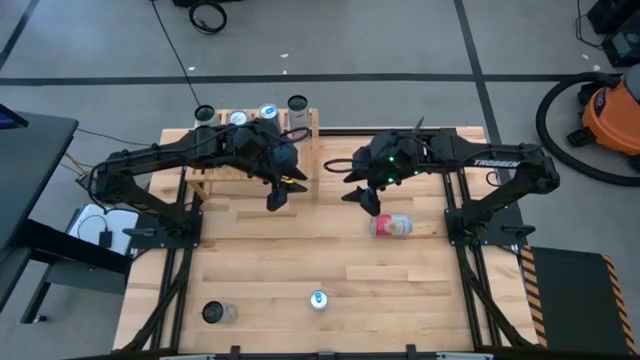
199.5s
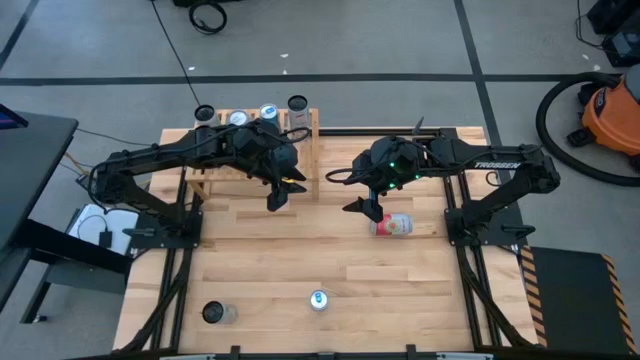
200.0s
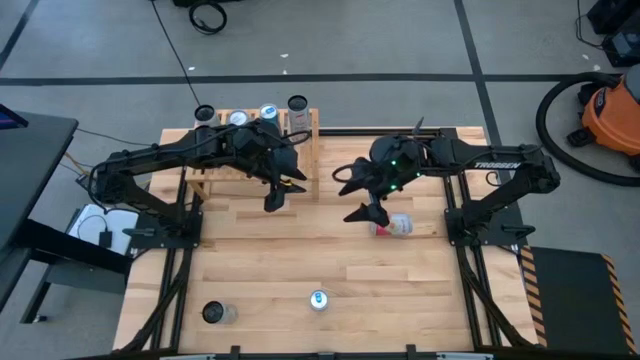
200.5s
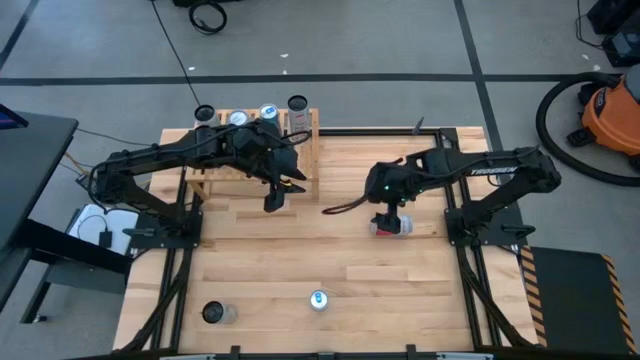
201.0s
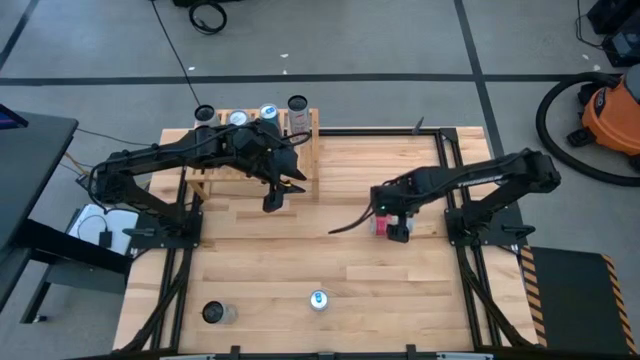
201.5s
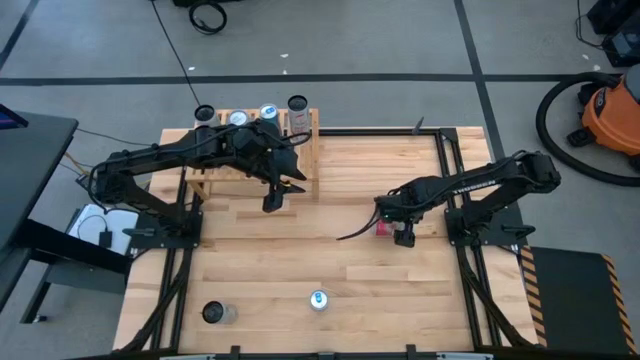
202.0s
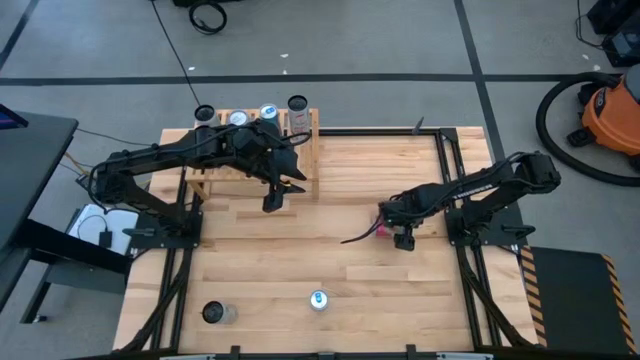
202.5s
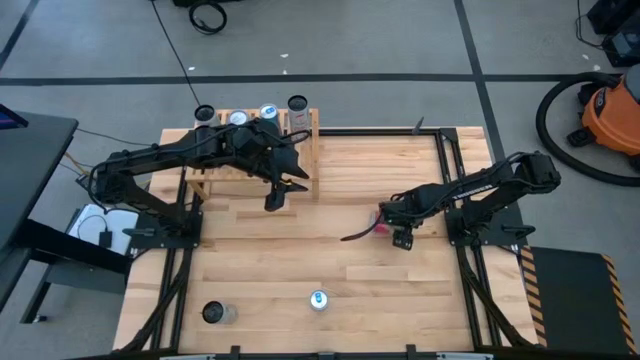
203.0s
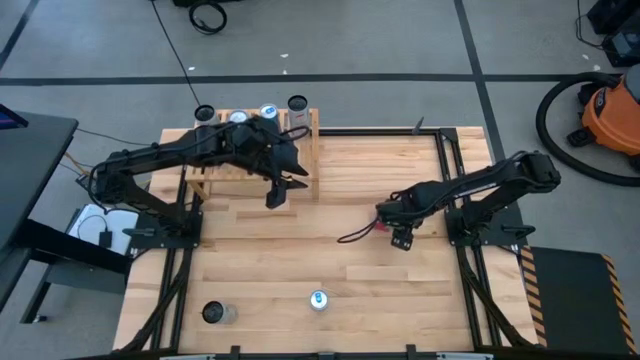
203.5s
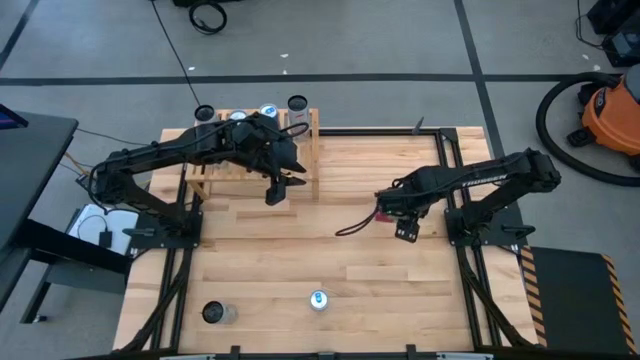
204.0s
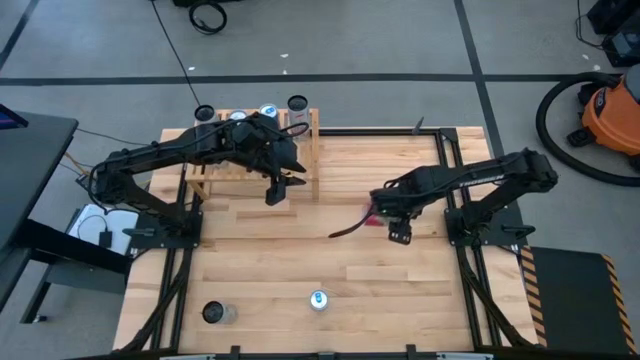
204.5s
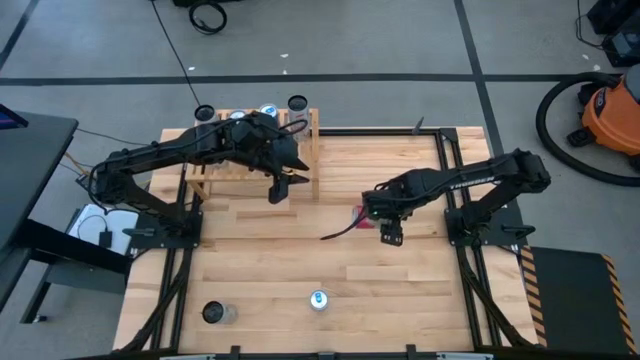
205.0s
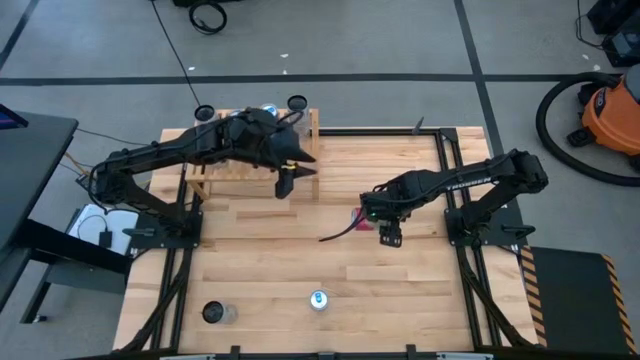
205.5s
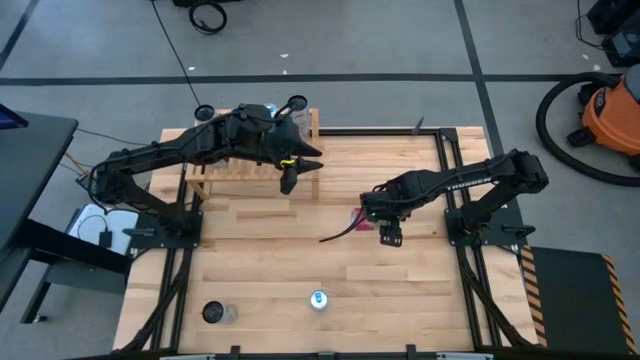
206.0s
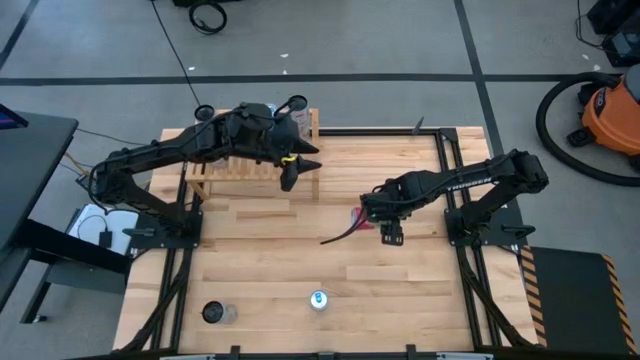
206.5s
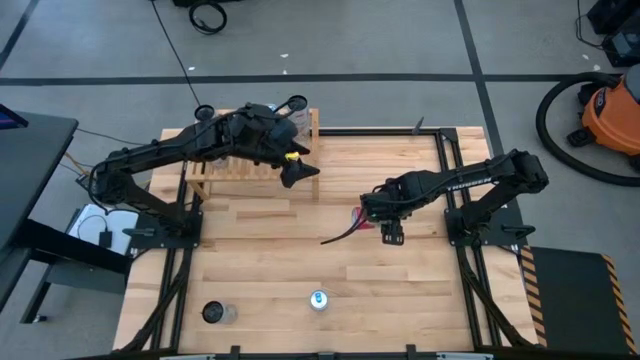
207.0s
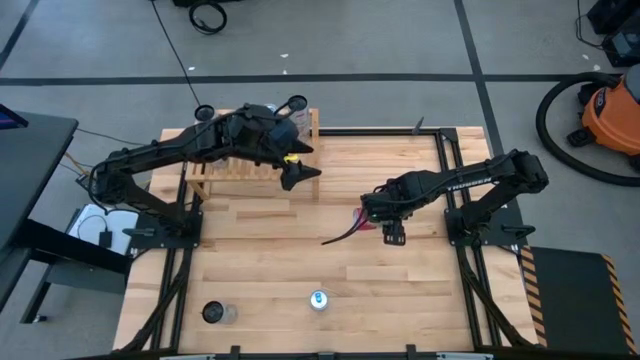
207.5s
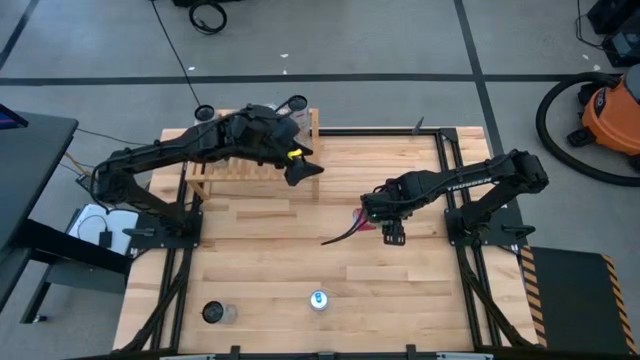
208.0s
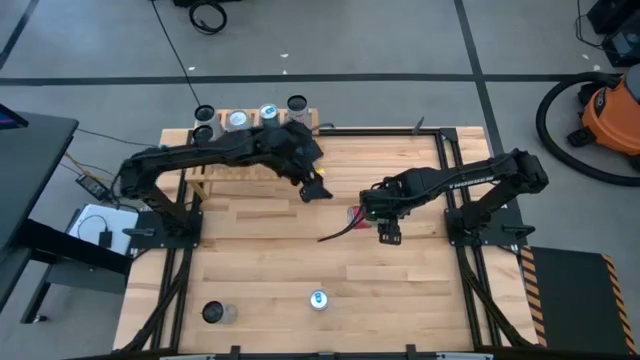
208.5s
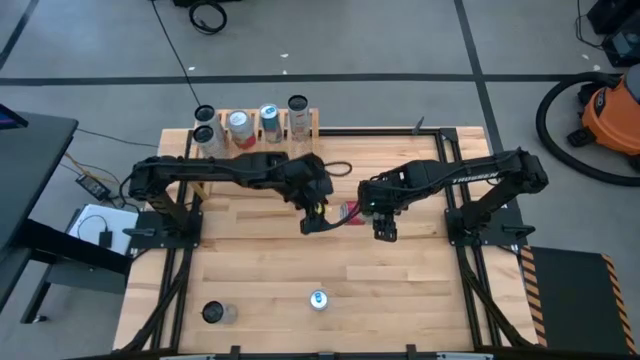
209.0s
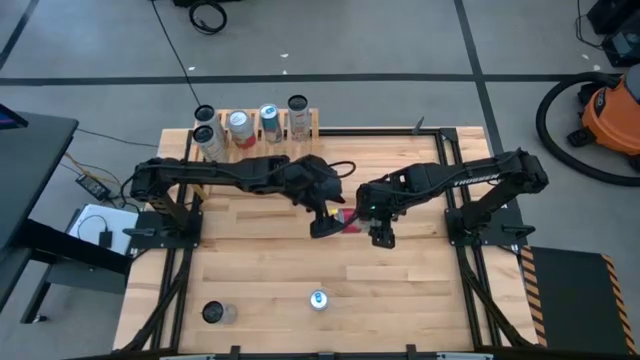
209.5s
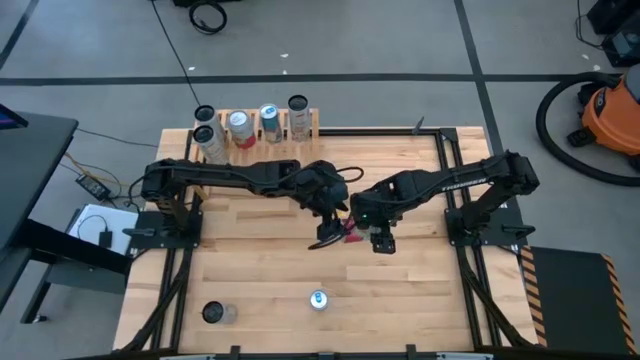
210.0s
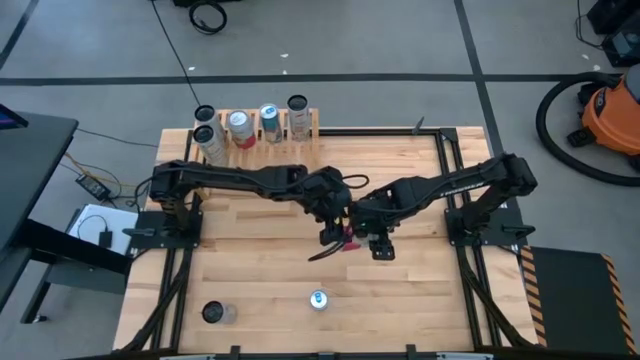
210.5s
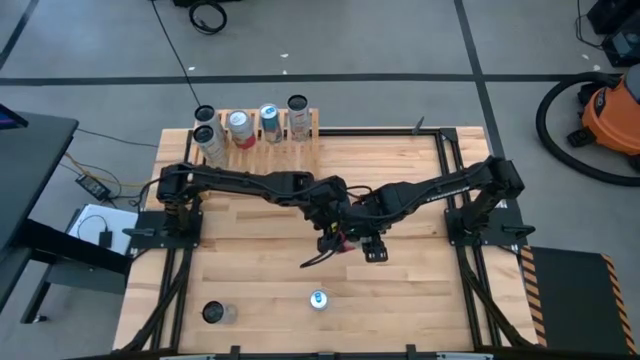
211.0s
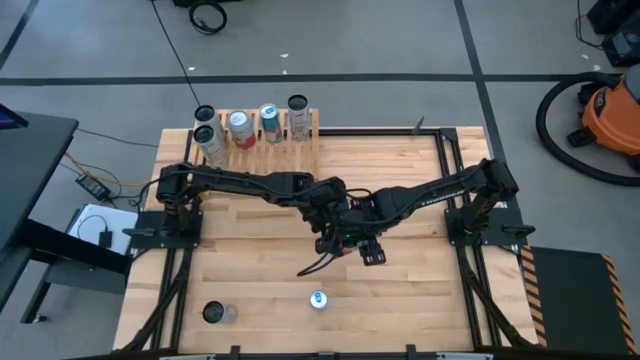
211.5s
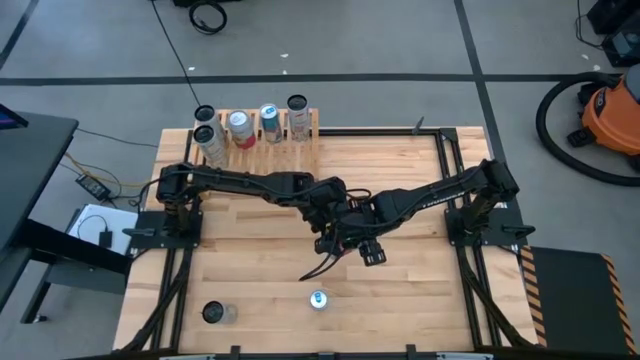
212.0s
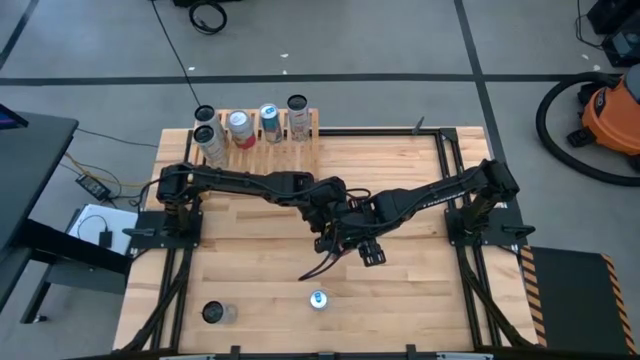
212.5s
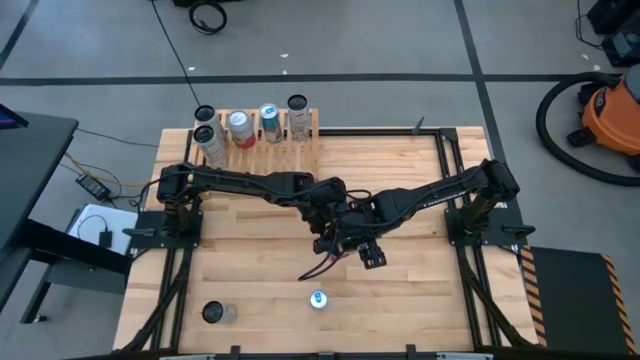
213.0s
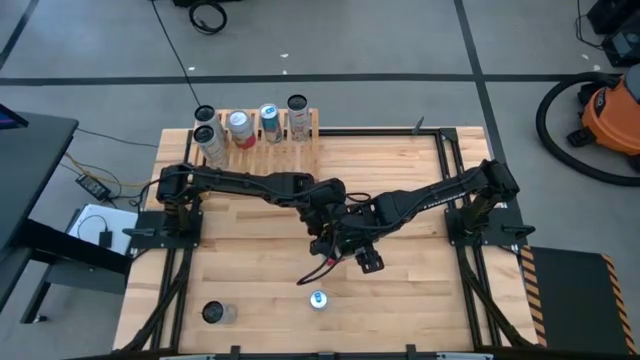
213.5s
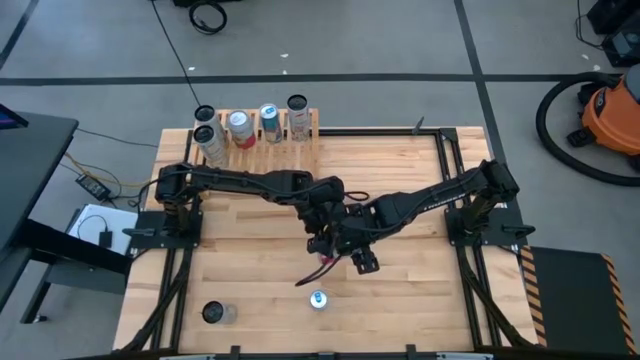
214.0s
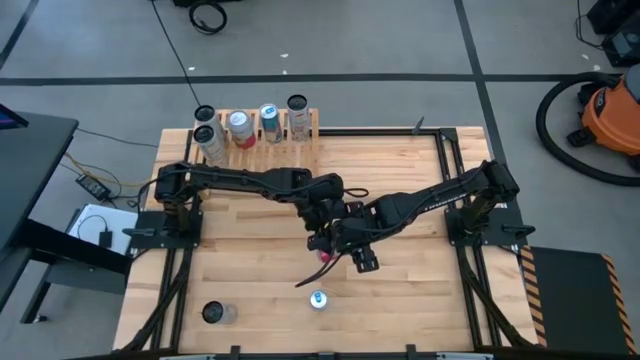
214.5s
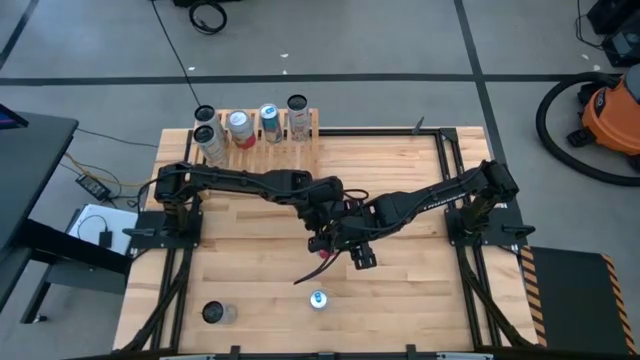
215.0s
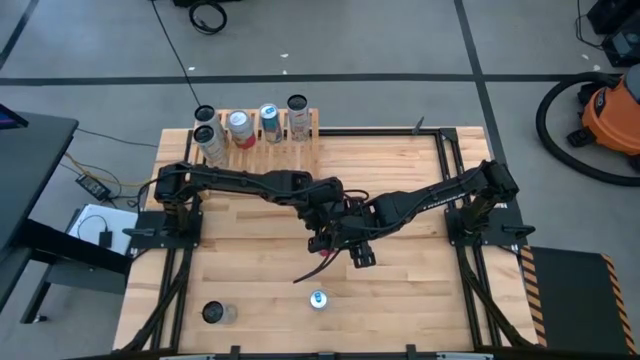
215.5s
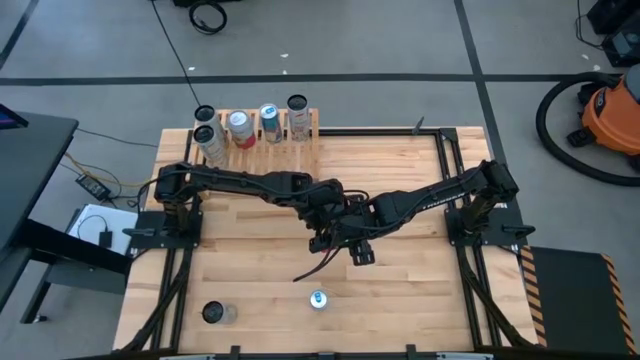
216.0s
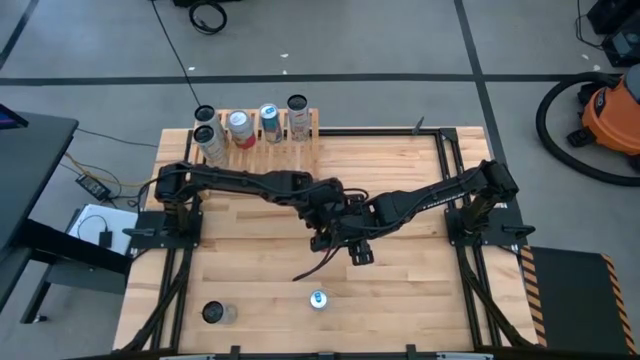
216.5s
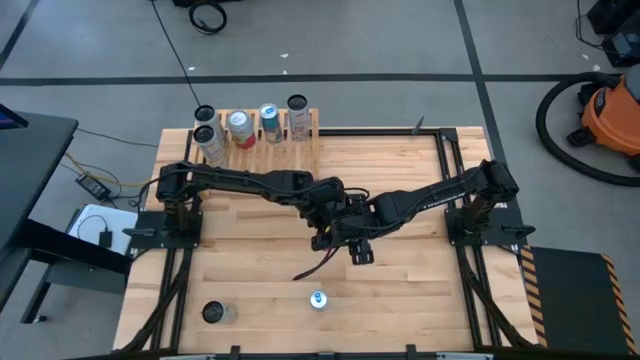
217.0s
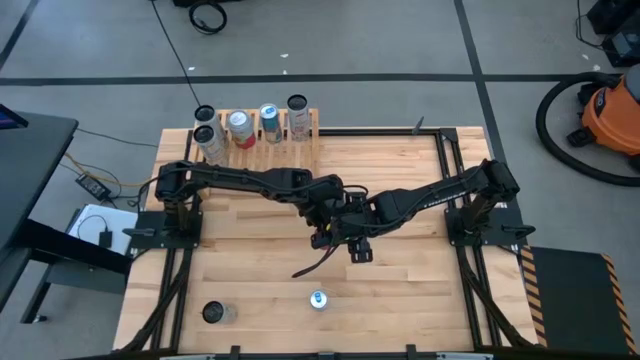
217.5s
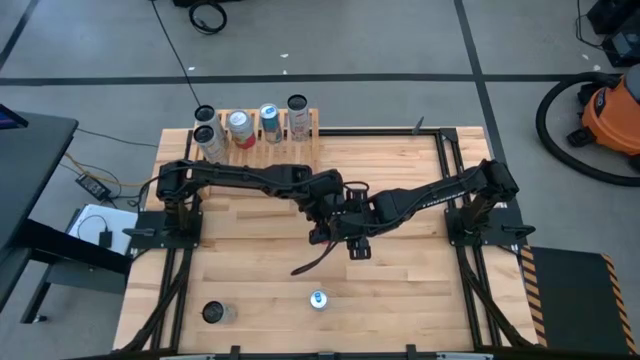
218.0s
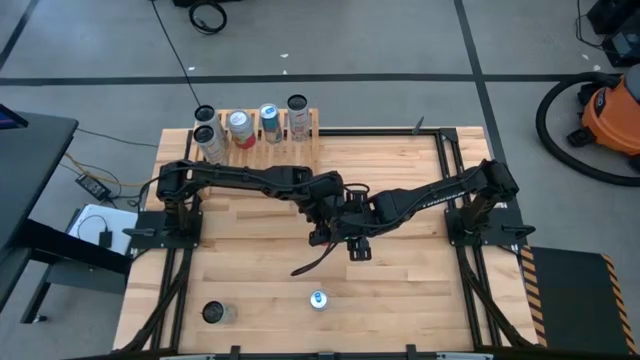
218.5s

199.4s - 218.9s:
Task: Place canned beverage on shelf
Put the pink white soda can on the shelf aligned with the other pink white soda can

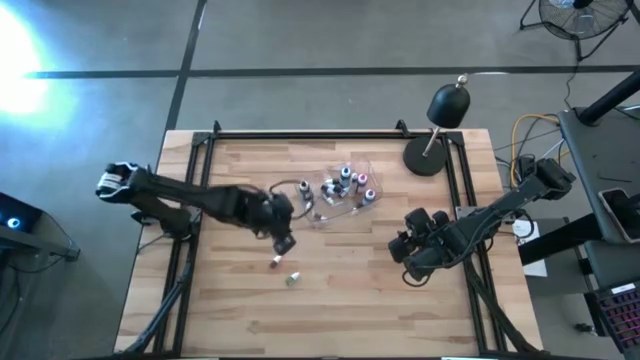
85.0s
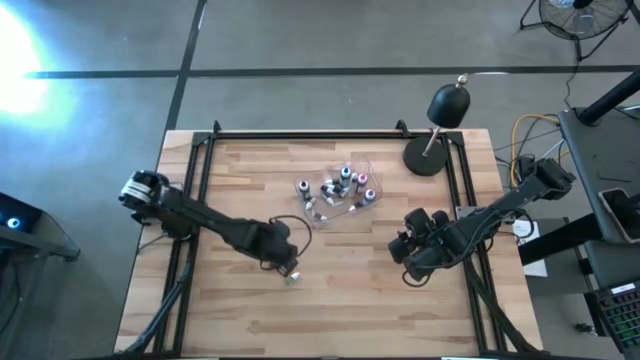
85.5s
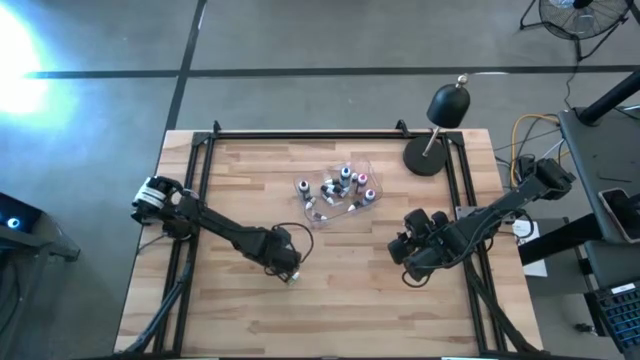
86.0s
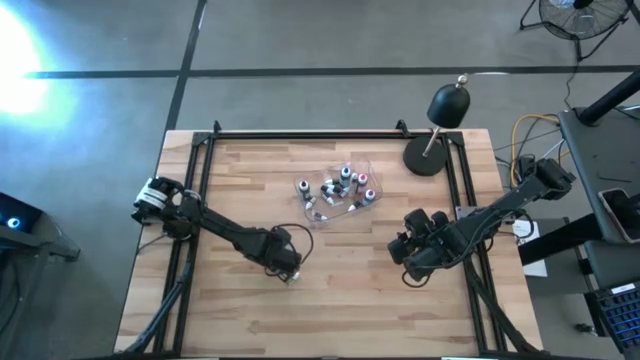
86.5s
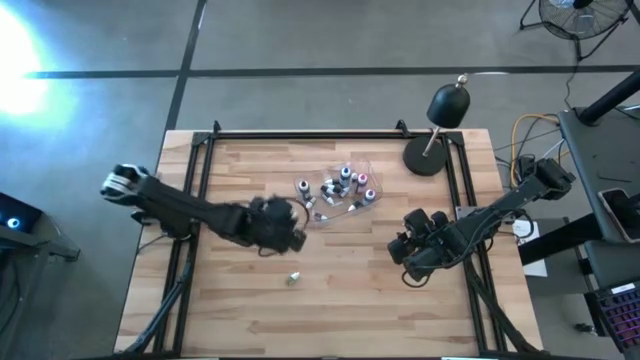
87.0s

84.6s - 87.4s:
Task: Pick & Place food coloring
Put the small red food coloring bottle into the transparent bin

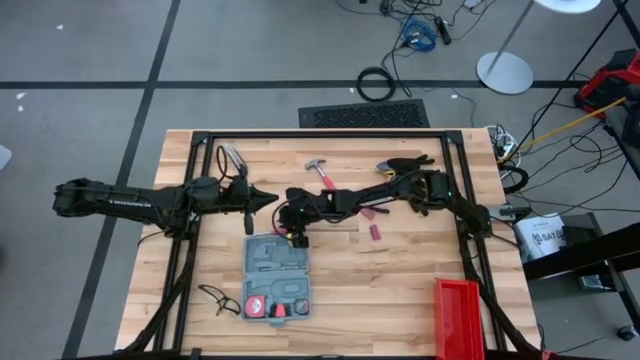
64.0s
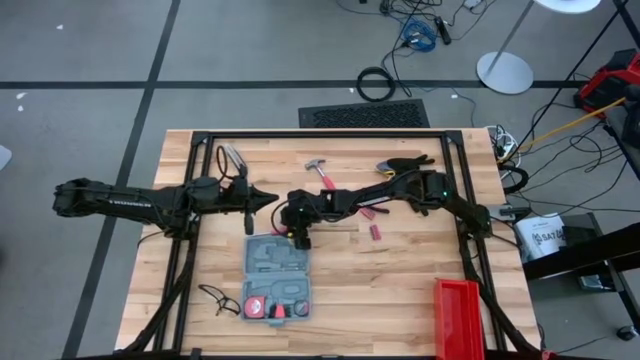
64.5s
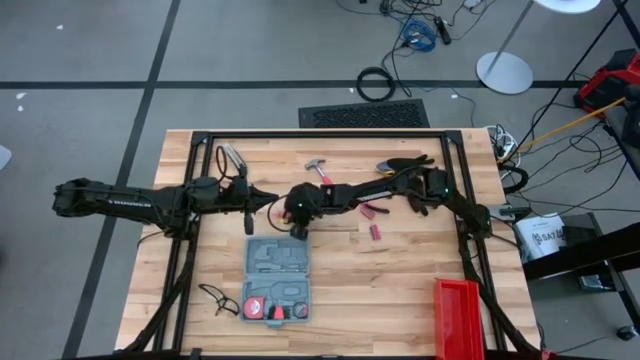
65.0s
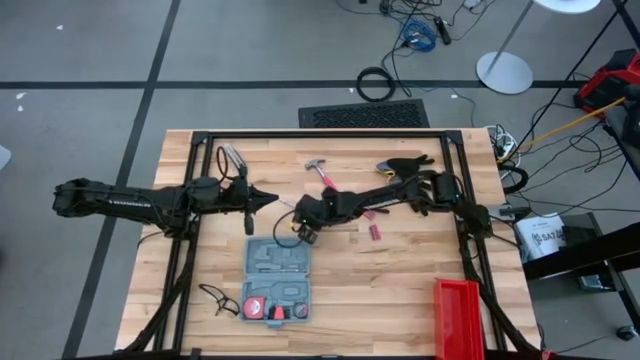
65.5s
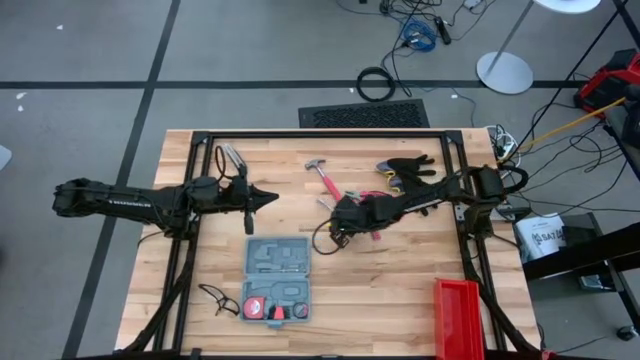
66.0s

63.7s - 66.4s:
Task: prefit tool cases
Remove the pink screwdriver from the gray prefit tool case
